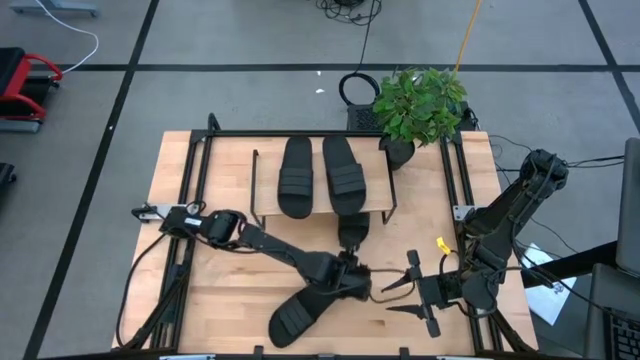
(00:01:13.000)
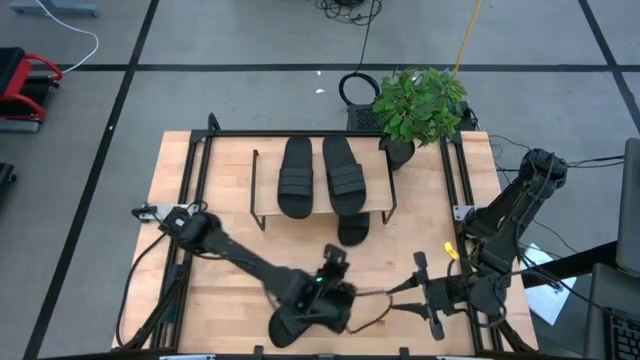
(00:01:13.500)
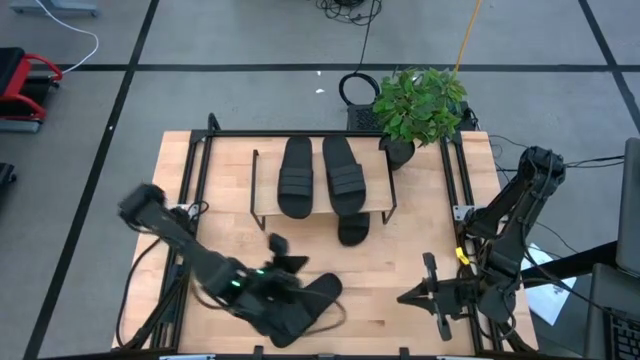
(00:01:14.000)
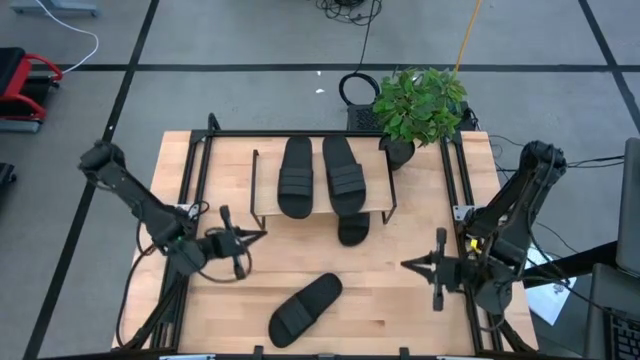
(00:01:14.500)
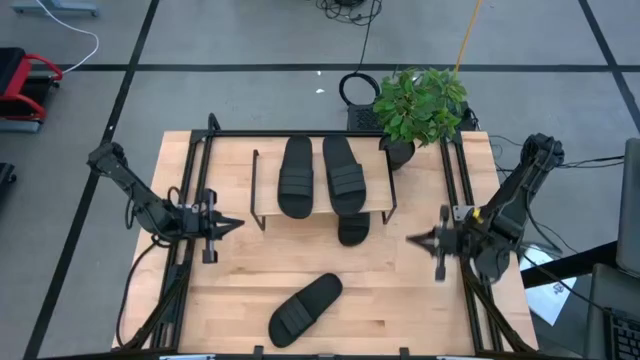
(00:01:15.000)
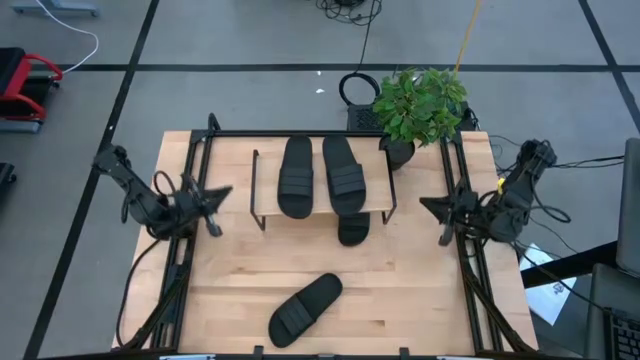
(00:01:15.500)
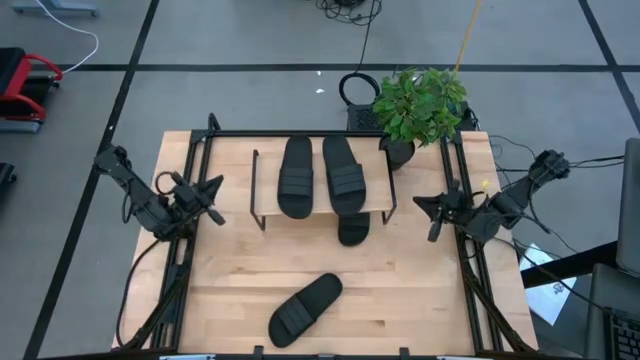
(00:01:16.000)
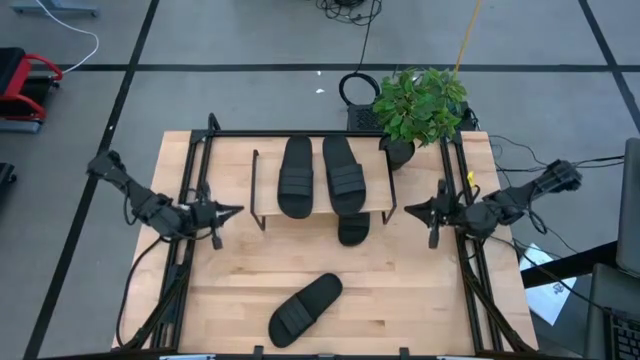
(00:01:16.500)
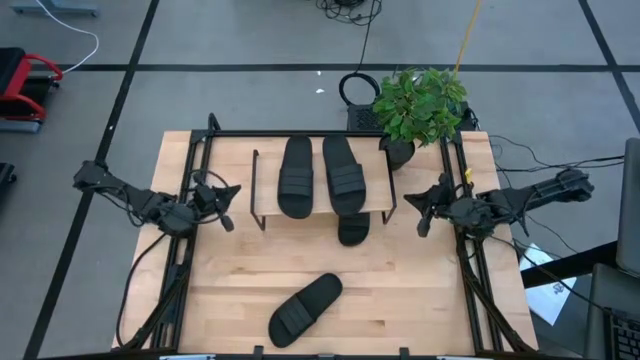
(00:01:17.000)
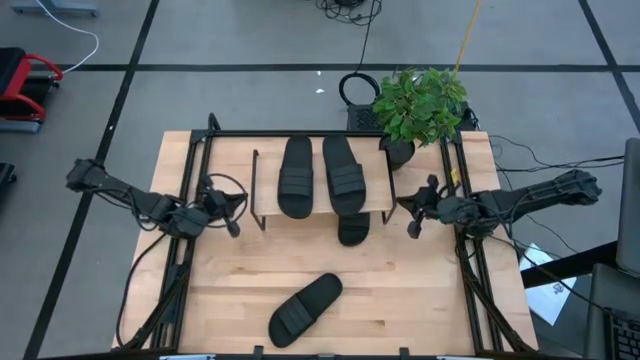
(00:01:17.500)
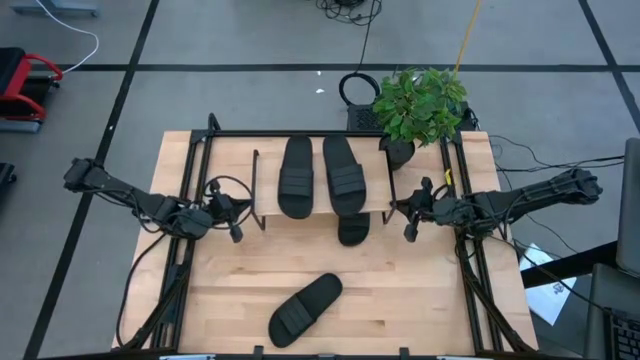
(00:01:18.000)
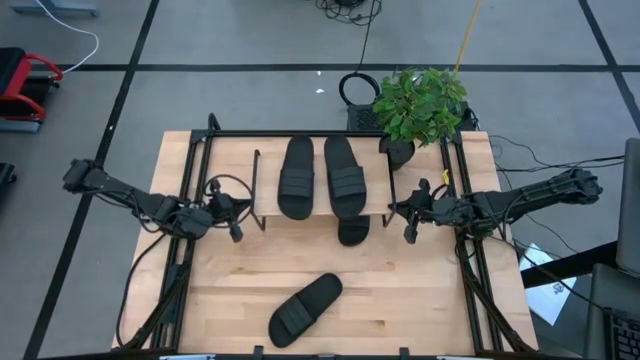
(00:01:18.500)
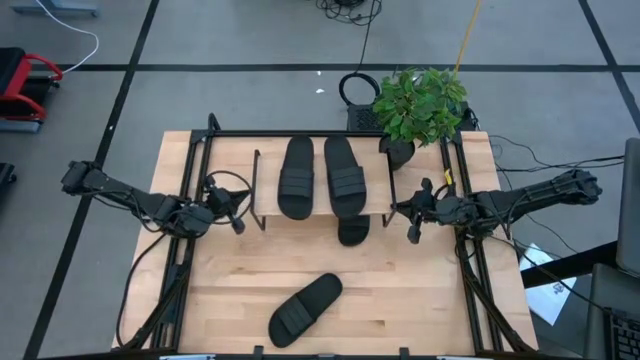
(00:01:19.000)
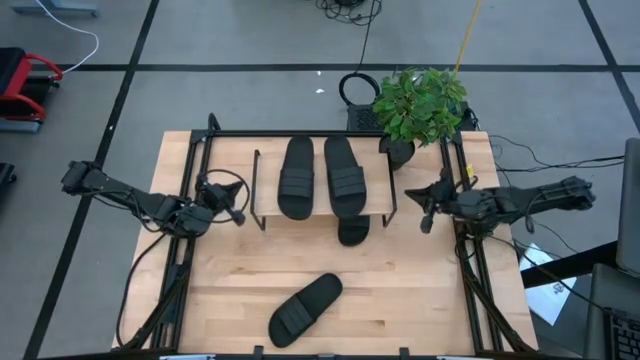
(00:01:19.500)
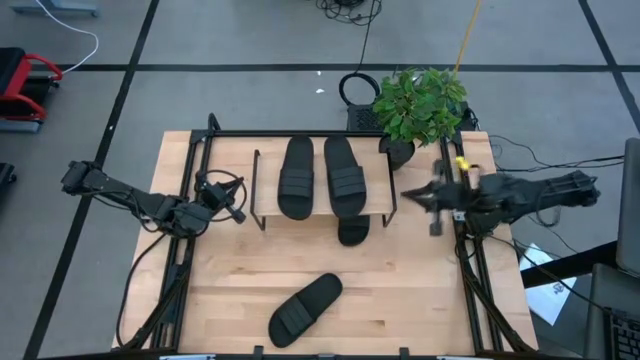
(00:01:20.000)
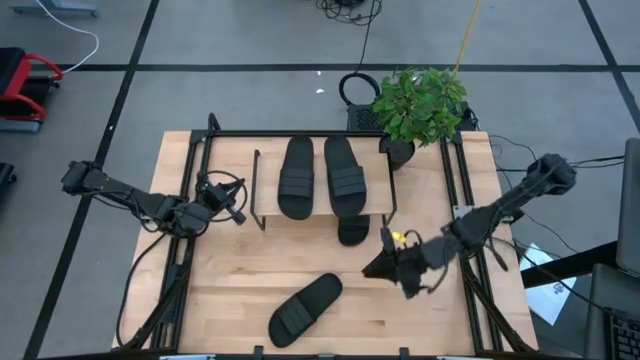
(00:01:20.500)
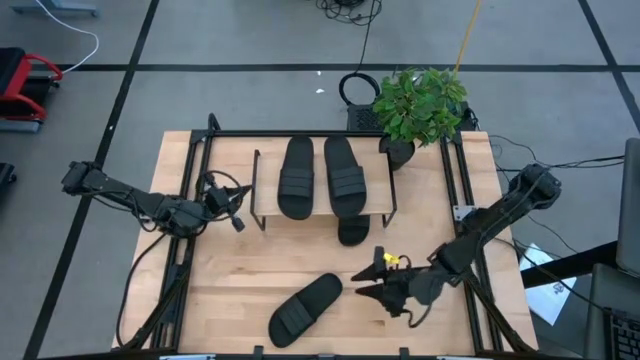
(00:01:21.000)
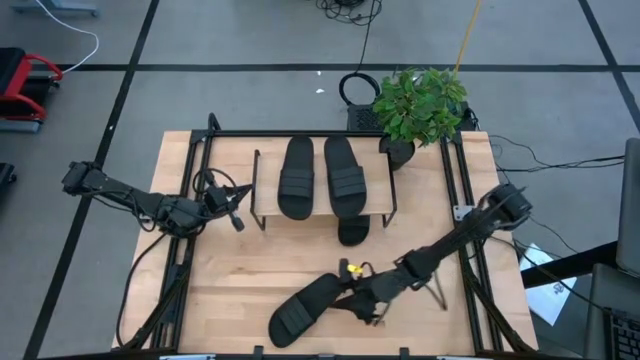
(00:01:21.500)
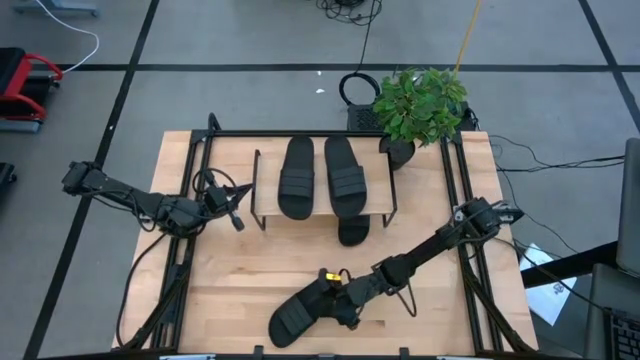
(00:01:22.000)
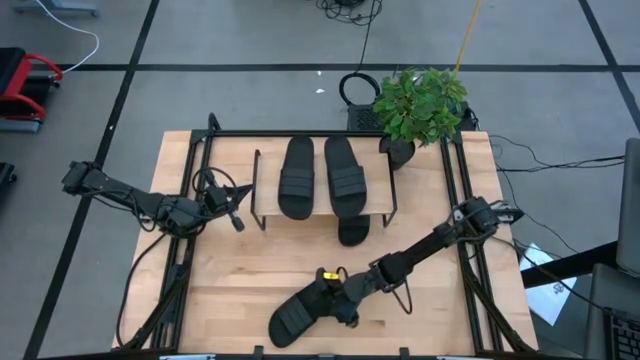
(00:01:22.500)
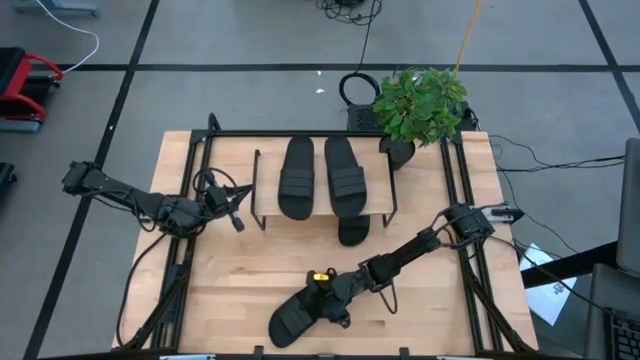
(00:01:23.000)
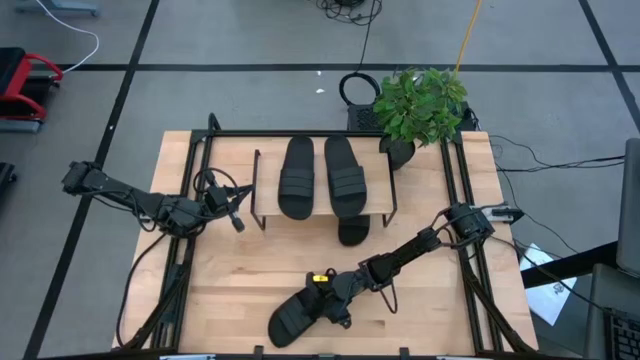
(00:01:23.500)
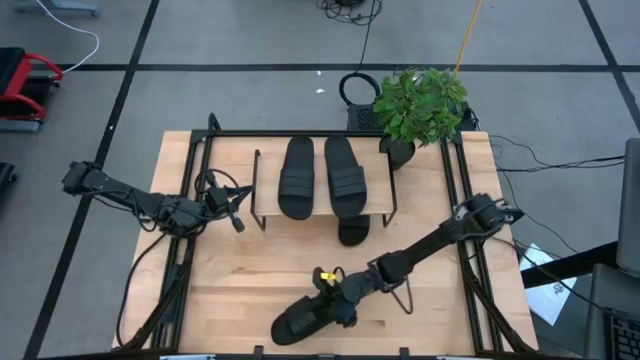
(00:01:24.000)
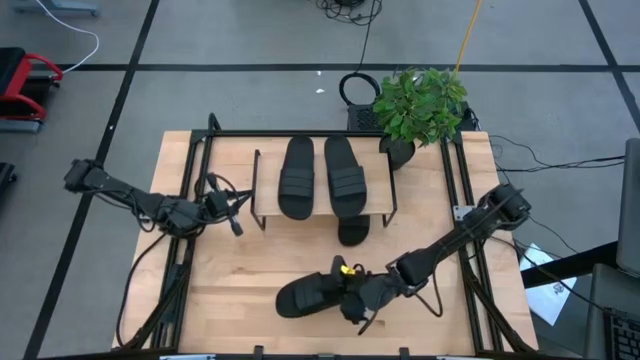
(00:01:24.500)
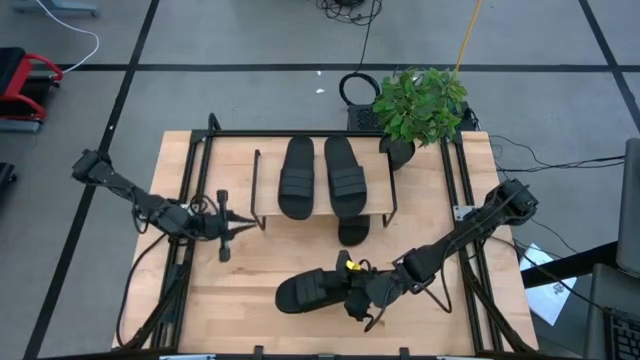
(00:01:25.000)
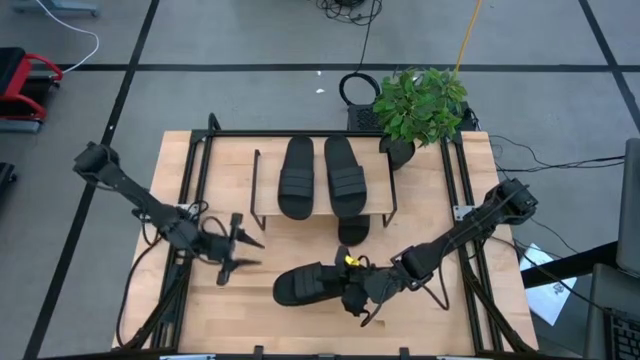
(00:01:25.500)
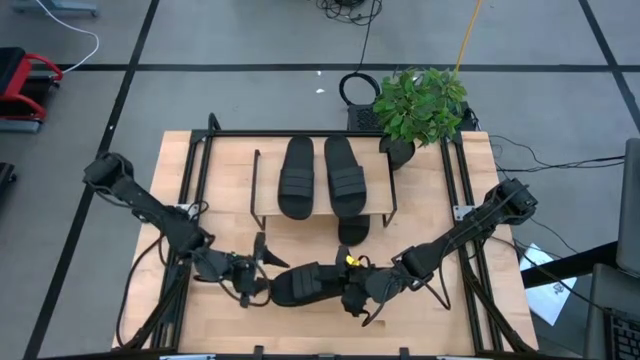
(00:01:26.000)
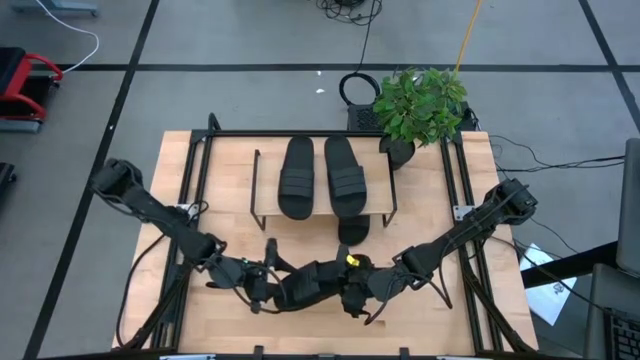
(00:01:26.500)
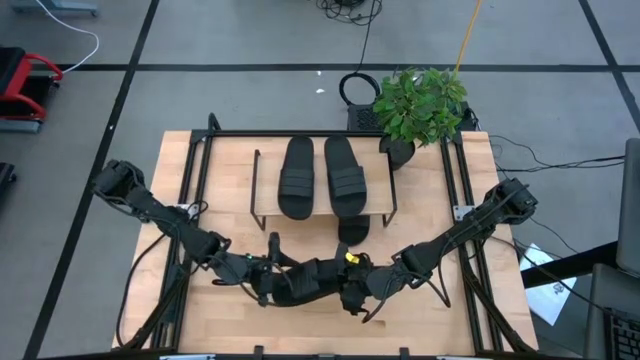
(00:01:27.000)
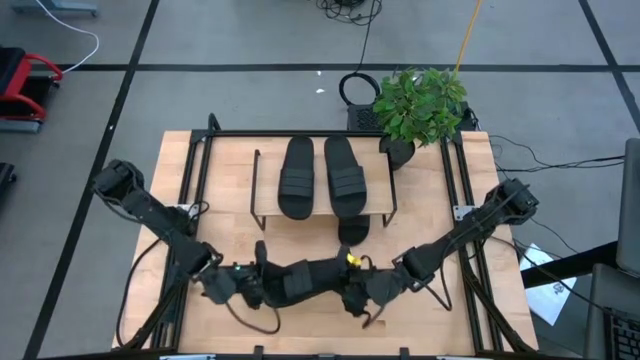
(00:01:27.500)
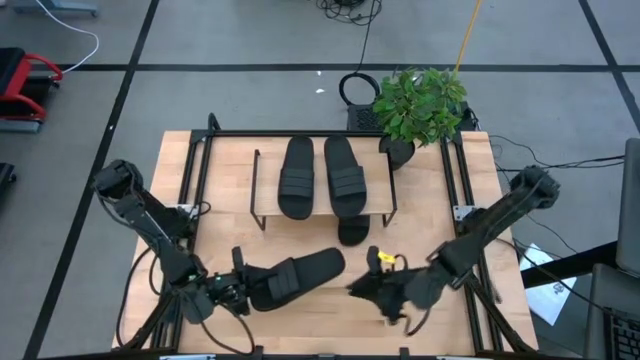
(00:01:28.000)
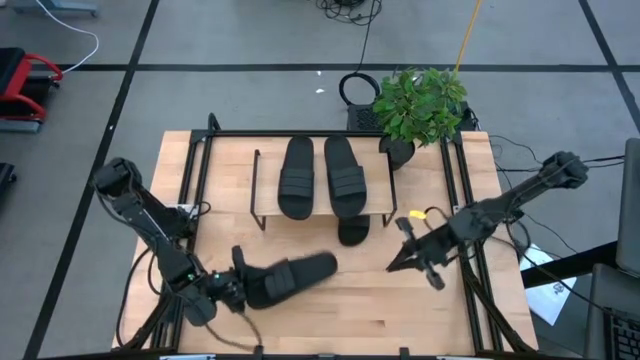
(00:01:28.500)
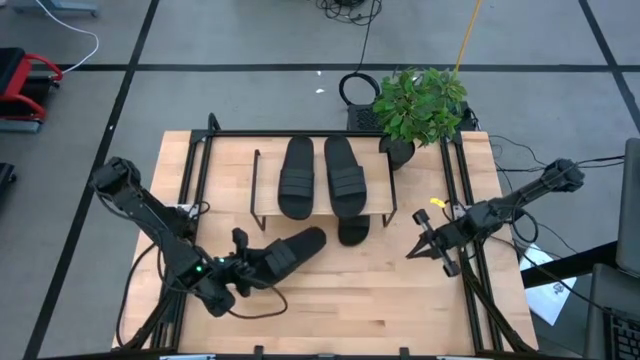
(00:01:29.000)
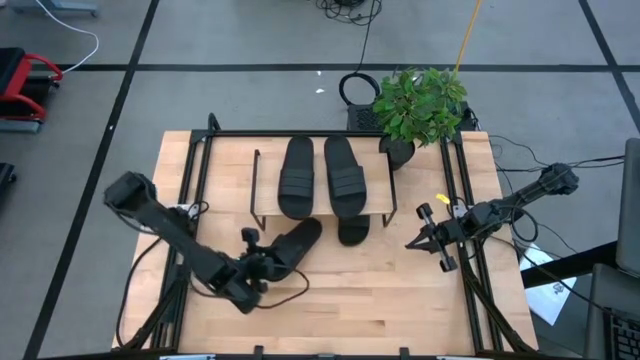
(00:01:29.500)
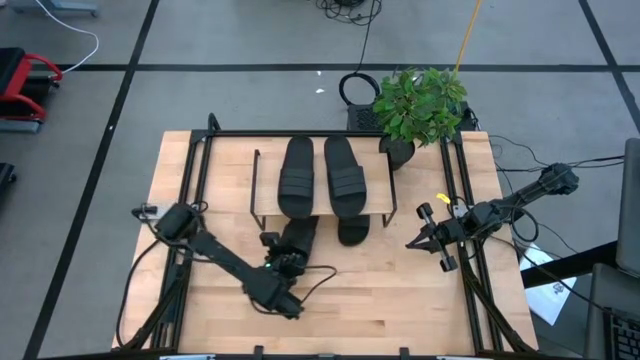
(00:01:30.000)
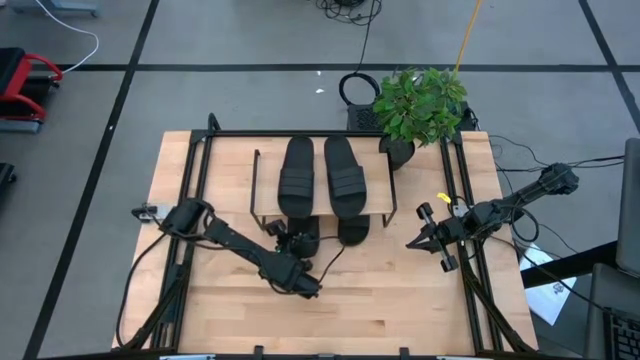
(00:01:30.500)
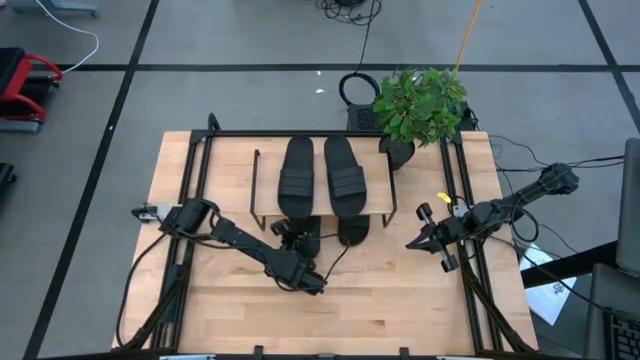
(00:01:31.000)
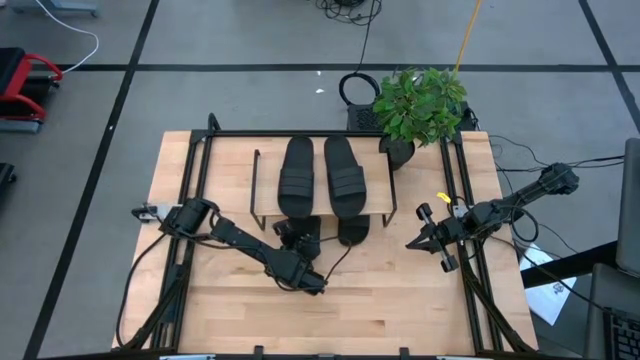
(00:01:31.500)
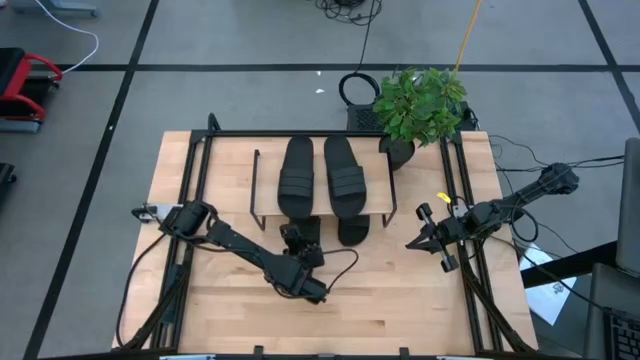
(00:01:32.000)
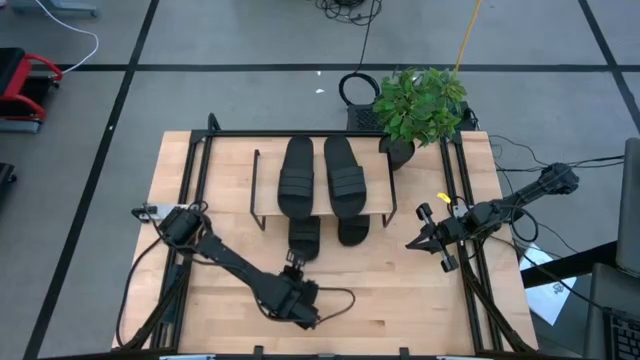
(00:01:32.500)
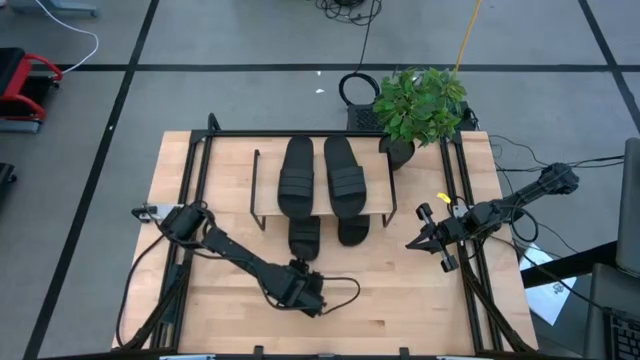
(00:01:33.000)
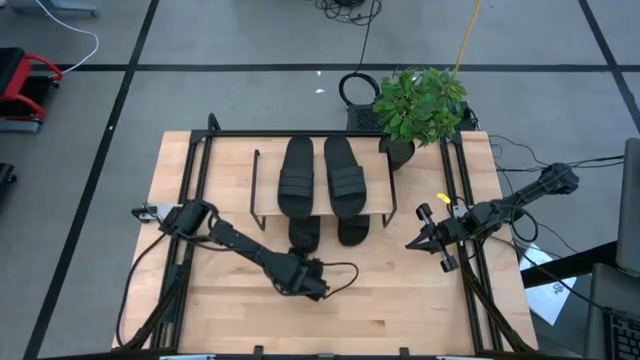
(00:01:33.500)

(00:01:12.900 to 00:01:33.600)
Task: Pick and place slides into the shelf
Put the black slide under the shelf
